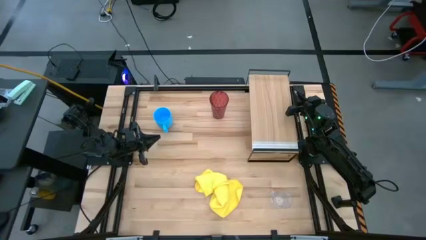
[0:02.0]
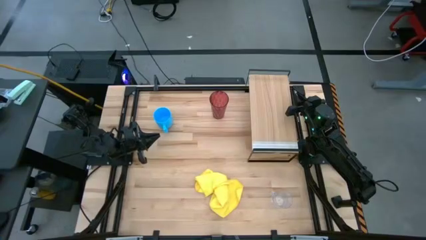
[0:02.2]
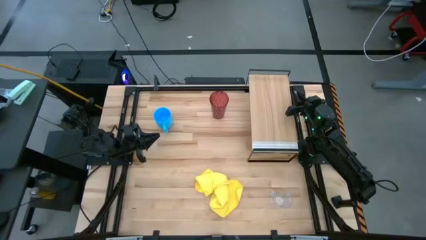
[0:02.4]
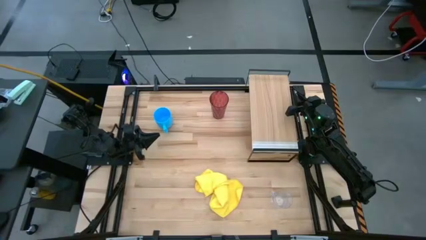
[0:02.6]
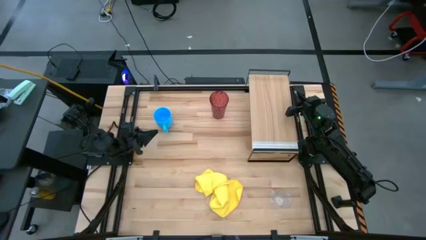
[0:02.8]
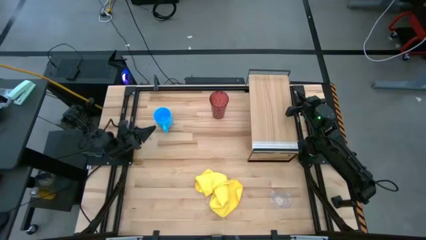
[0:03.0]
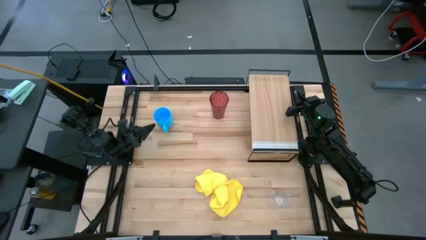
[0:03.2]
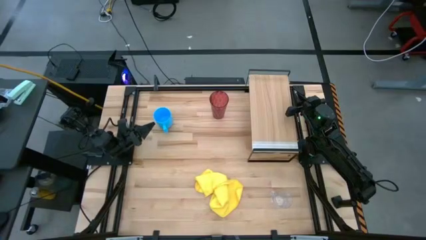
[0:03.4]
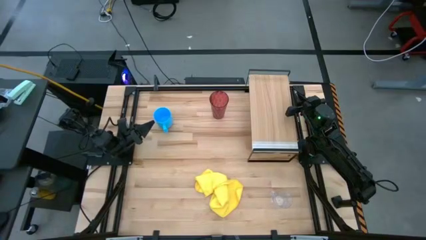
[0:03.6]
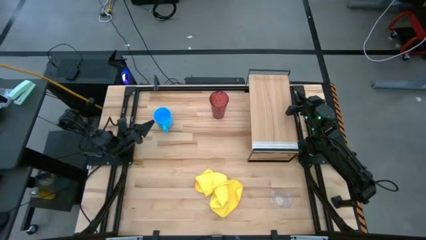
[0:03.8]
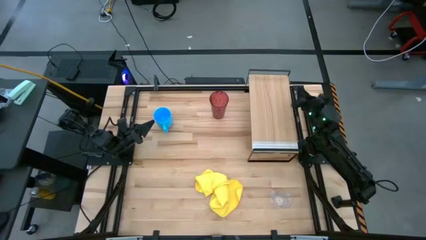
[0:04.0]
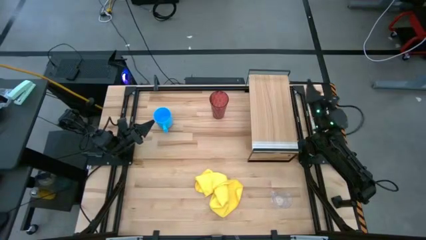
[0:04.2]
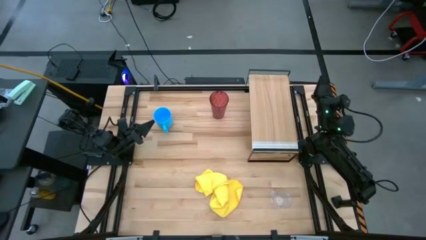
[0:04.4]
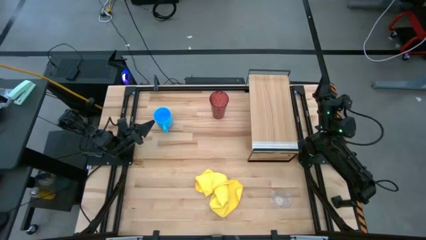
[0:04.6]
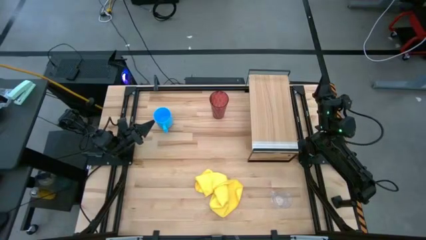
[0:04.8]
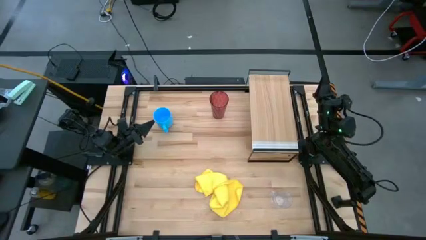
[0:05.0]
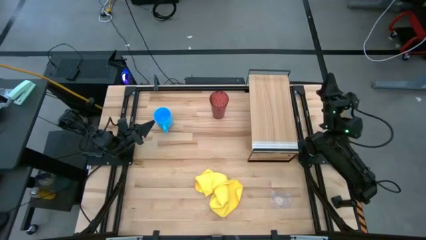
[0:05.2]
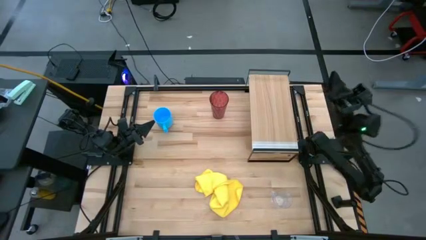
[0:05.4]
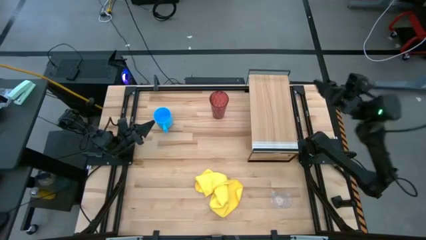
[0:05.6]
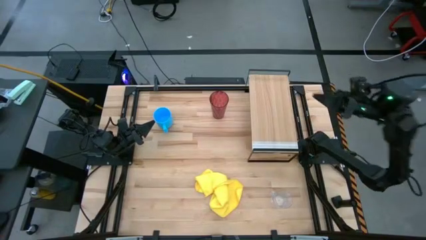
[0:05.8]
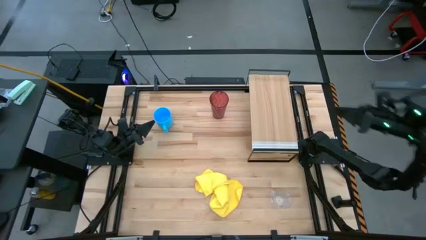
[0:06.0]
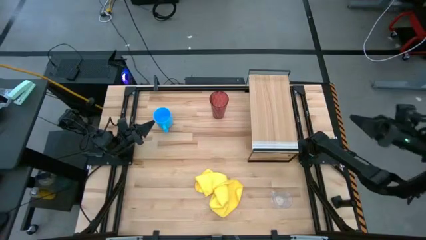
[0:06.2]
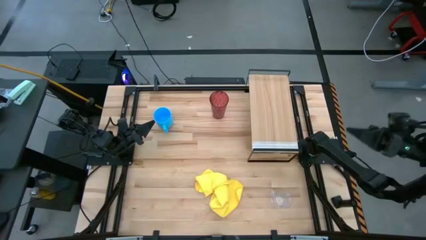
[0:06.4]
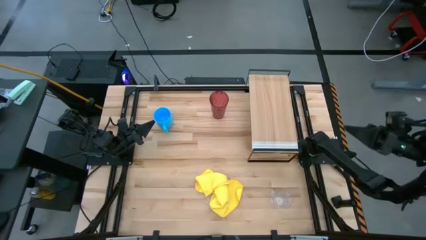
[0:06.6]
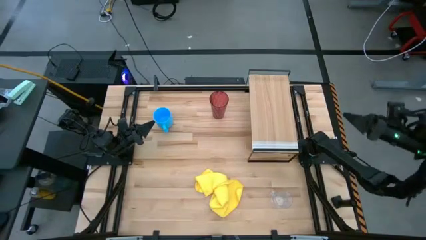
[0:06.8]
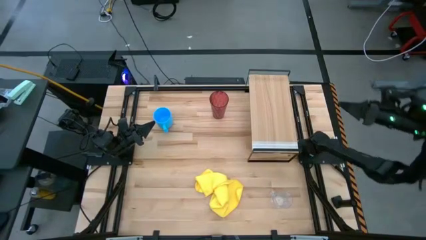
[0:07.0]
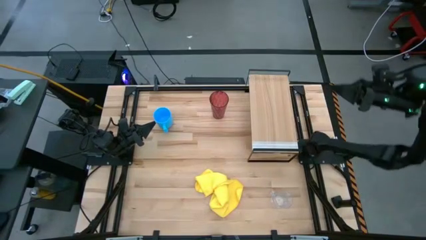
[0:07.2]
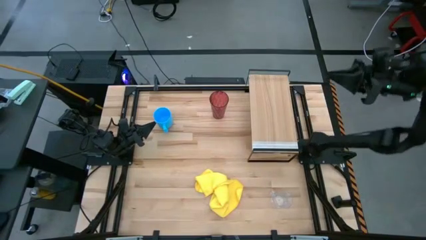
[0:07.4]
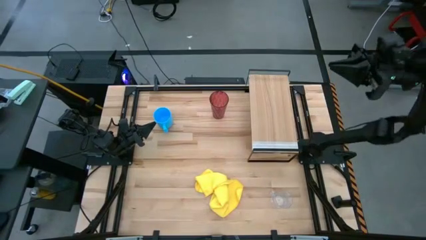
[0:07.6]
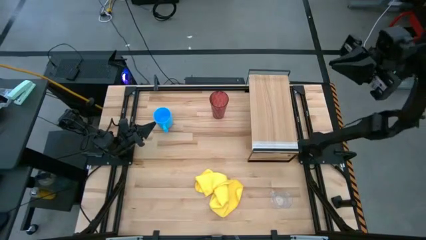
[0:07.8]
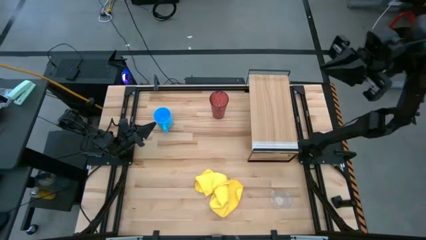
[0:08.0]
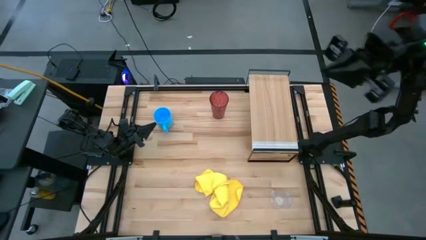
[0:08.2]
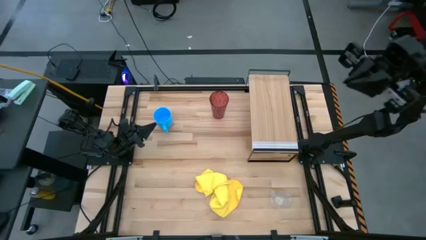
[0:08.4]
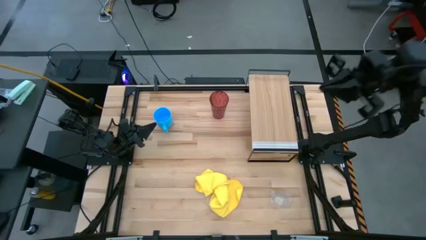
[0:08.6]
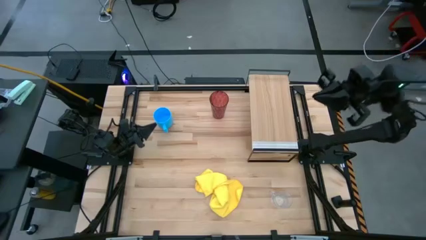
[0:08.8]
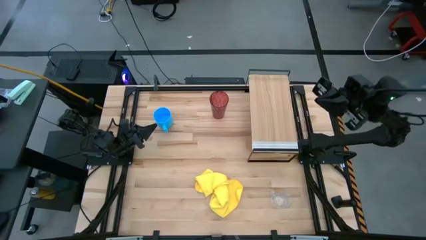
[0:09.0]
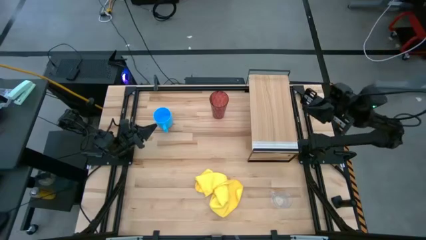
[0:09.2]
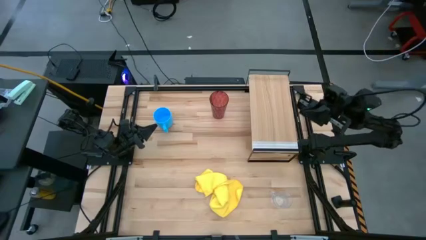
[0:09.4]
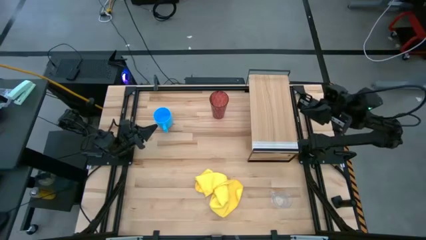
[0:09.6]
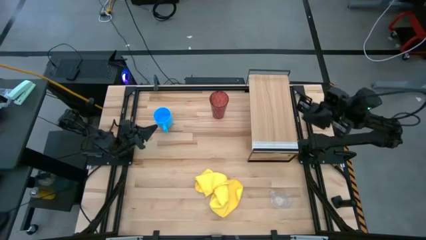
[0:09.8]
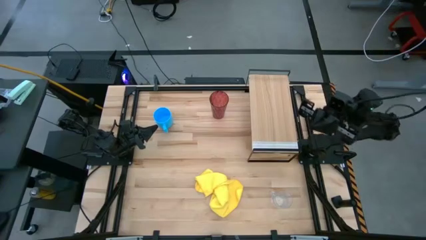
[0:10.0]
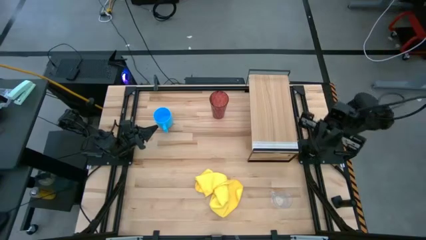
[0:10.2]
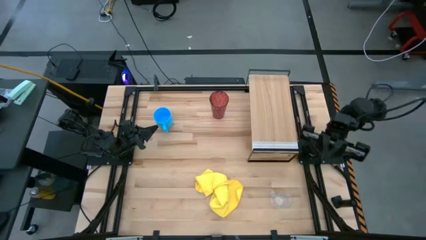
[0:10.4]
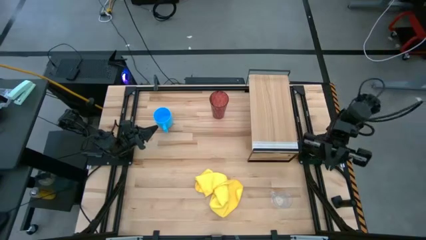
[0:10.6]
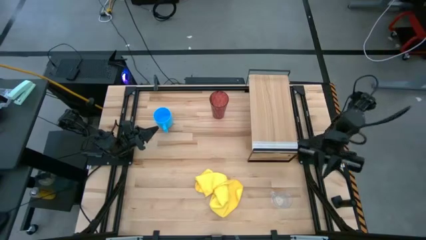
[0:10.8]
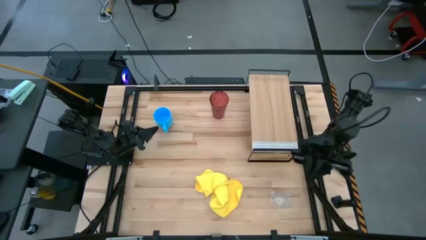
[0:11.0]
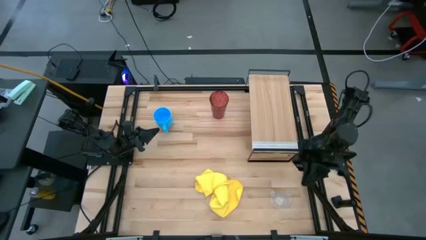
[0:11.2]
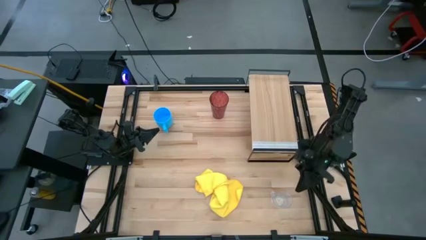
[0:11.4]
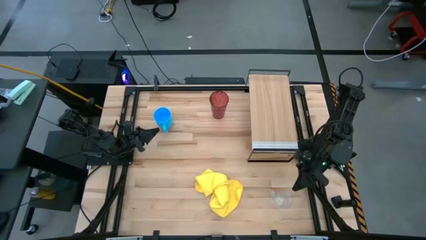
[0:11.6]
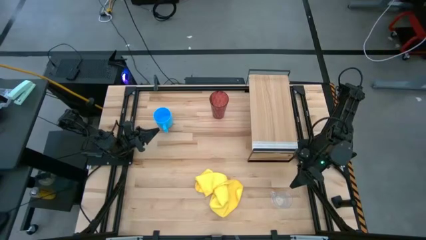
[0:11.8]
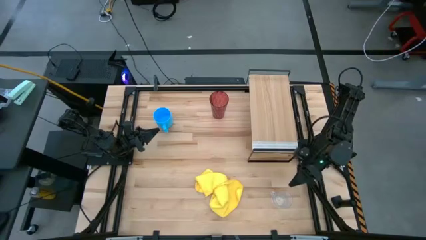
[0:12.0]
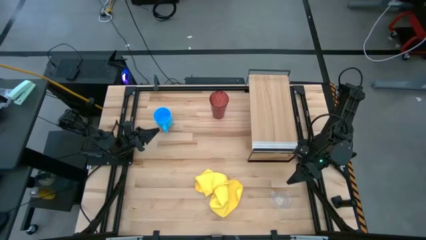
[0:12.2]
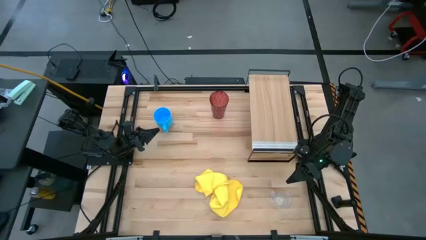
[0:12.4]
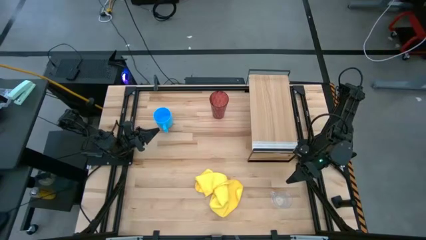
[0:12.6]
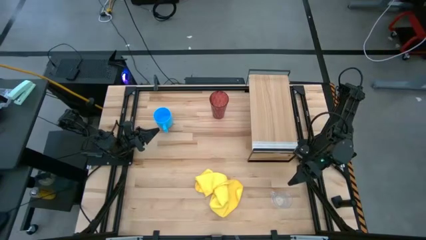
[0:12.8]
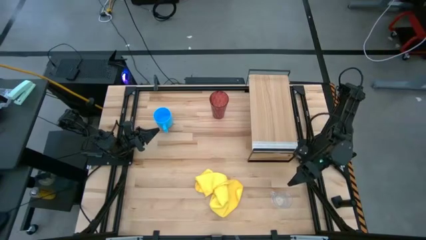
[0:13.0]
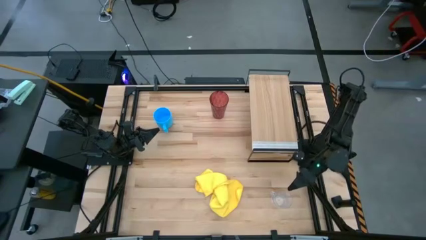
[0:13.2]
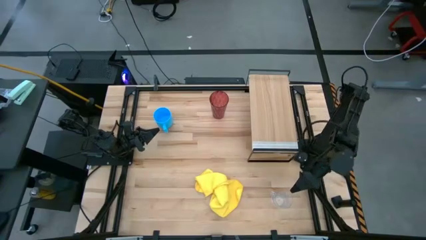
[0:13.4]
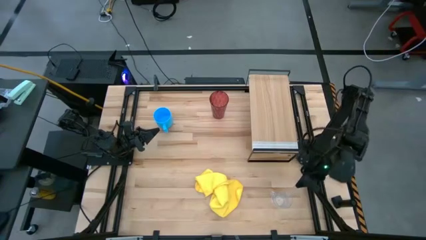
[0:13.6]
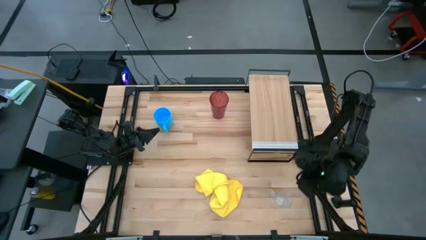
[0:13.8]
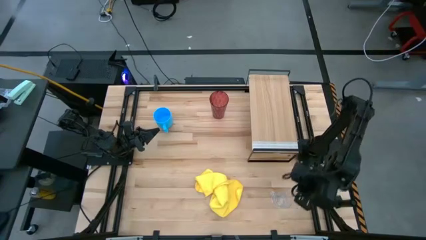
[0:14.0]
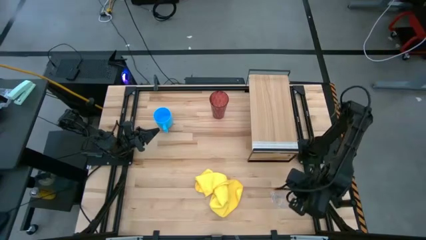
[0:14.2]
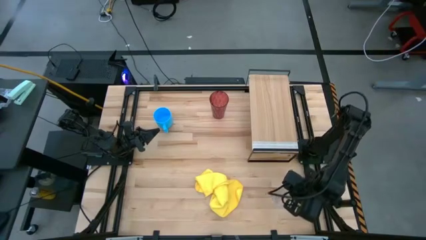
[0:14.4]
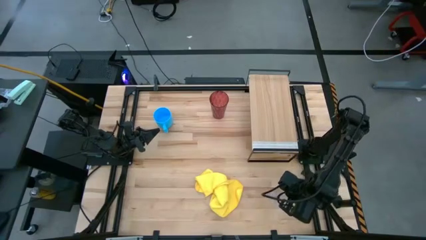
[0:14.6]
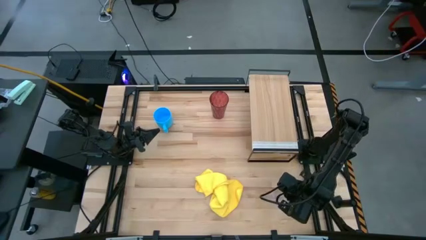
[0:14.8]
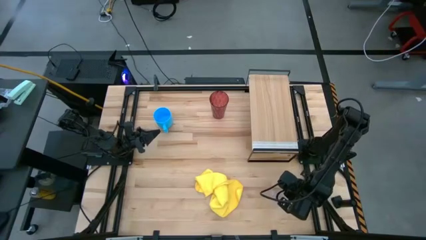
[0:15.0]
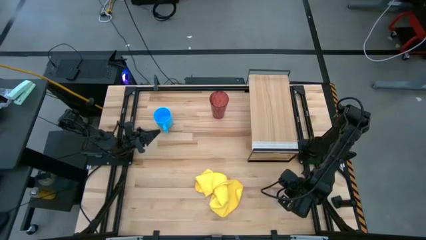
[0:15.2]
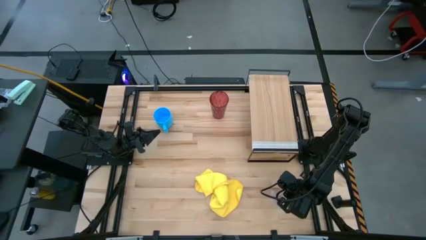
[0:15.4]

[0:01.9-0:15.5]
Task: Stack small to large cups/mugs on shelf
Put the transparent mug on the shelf
